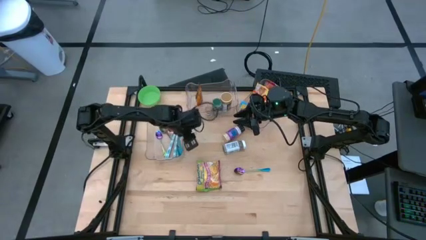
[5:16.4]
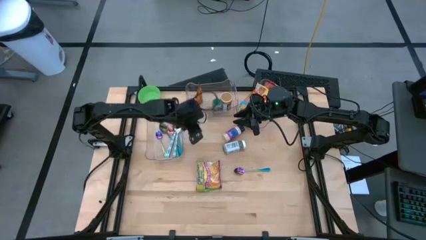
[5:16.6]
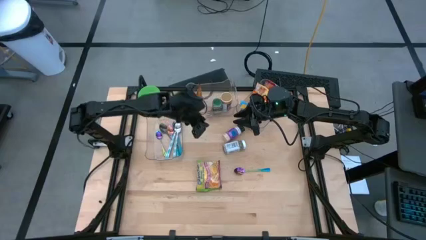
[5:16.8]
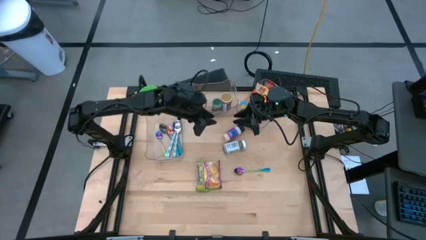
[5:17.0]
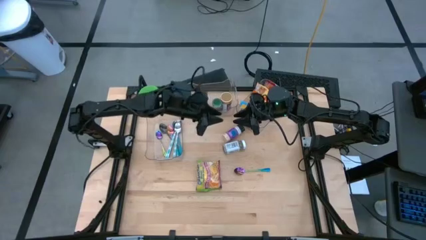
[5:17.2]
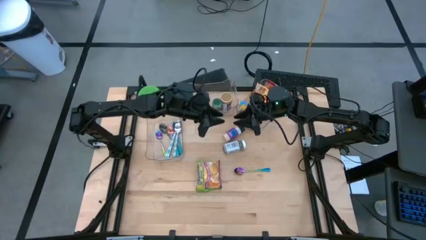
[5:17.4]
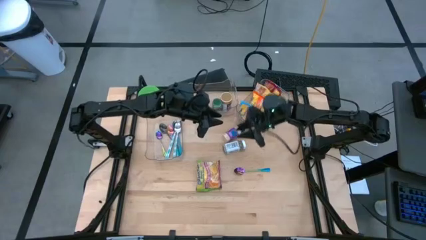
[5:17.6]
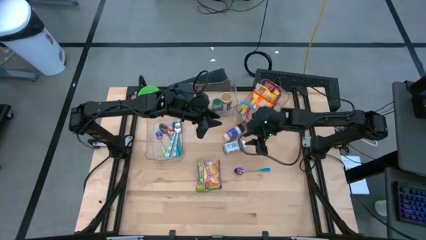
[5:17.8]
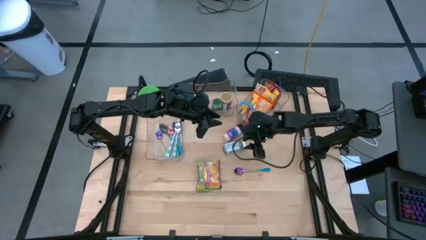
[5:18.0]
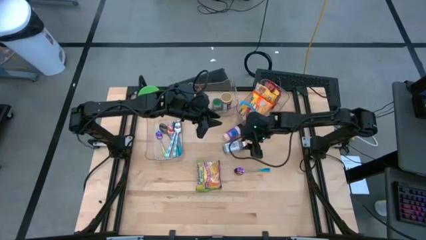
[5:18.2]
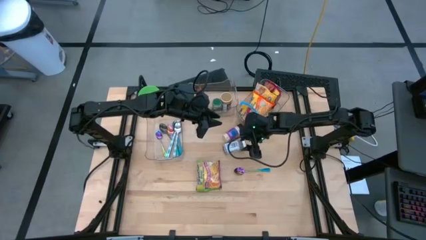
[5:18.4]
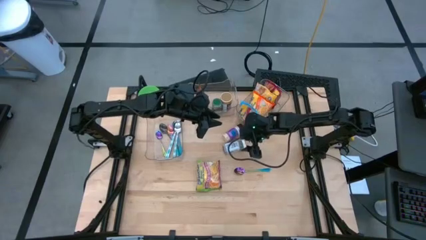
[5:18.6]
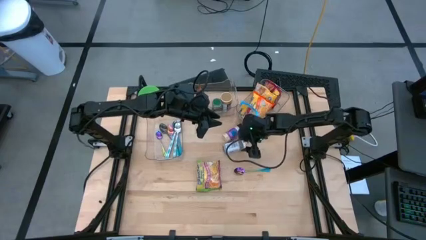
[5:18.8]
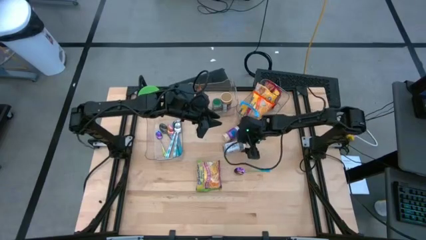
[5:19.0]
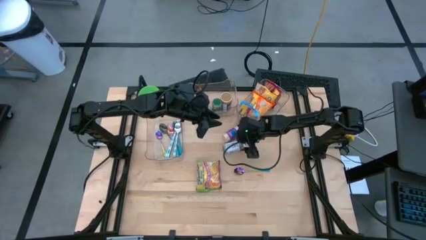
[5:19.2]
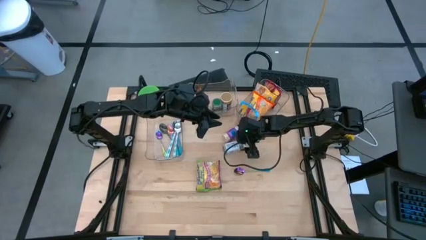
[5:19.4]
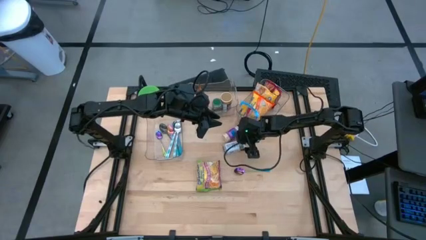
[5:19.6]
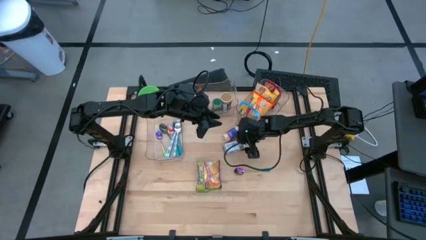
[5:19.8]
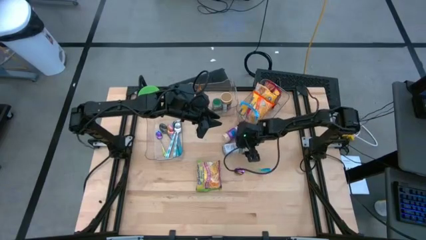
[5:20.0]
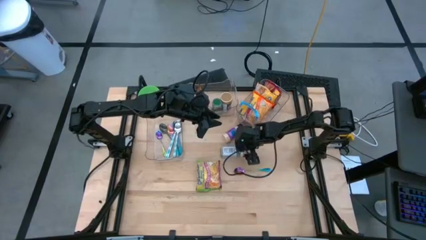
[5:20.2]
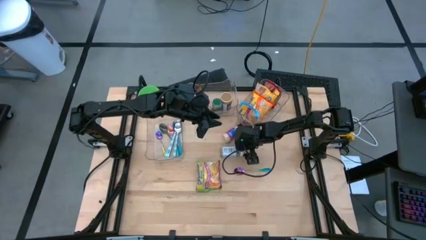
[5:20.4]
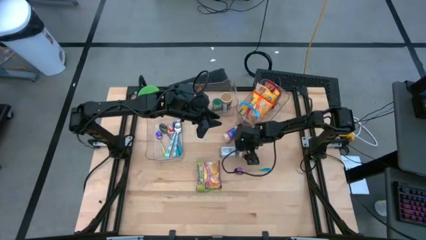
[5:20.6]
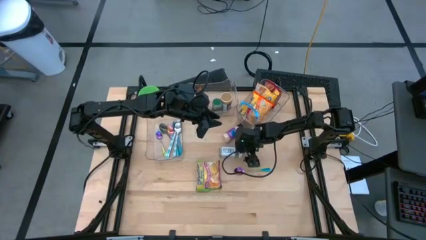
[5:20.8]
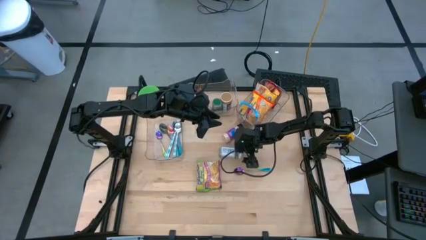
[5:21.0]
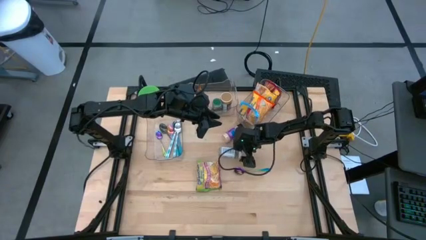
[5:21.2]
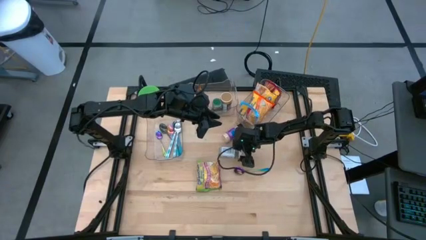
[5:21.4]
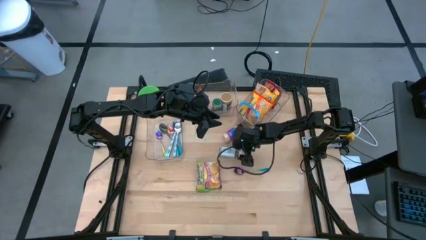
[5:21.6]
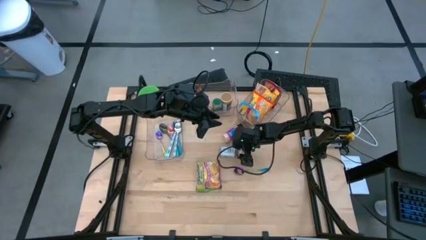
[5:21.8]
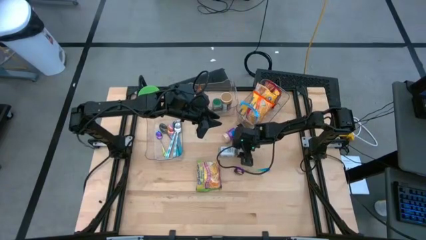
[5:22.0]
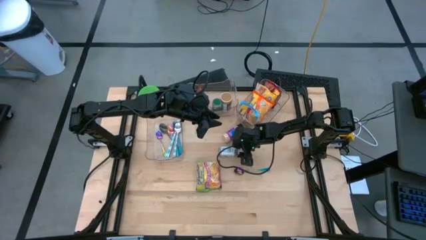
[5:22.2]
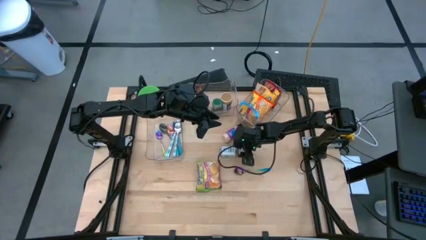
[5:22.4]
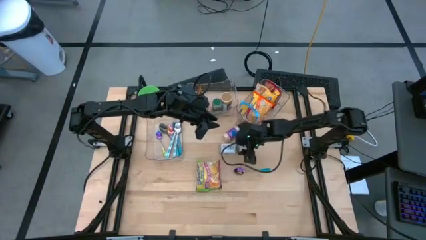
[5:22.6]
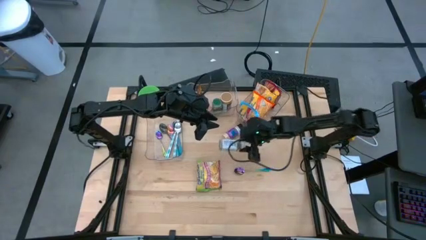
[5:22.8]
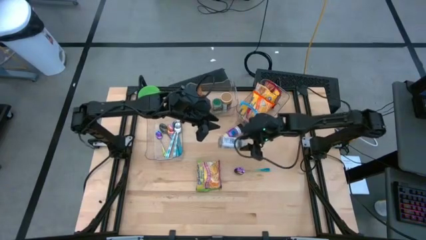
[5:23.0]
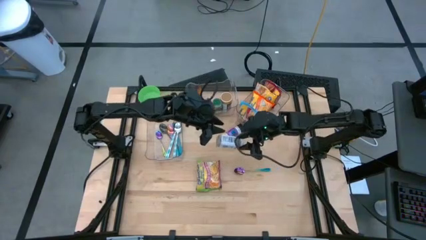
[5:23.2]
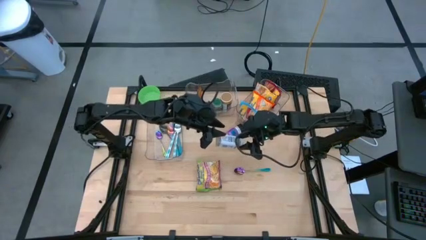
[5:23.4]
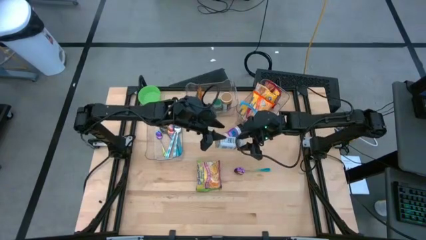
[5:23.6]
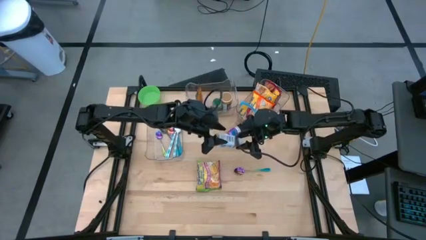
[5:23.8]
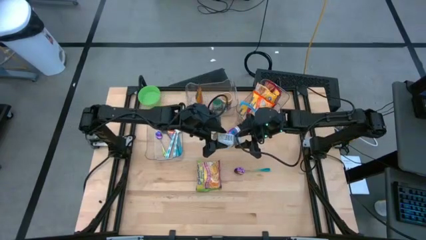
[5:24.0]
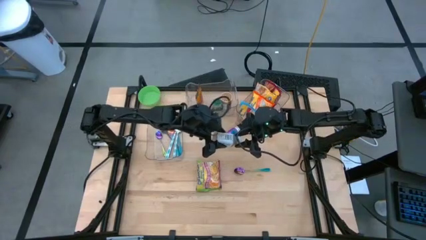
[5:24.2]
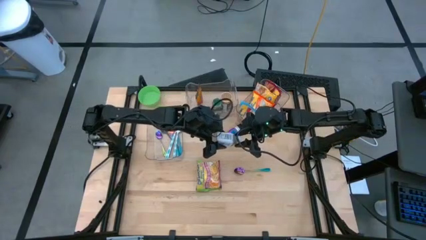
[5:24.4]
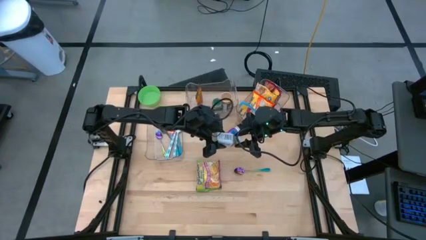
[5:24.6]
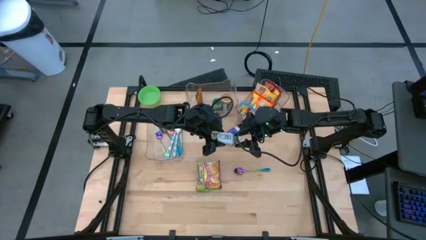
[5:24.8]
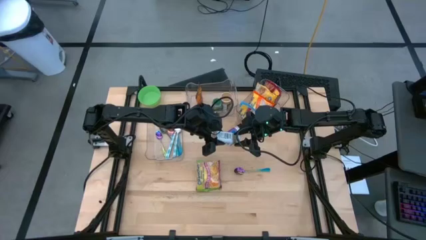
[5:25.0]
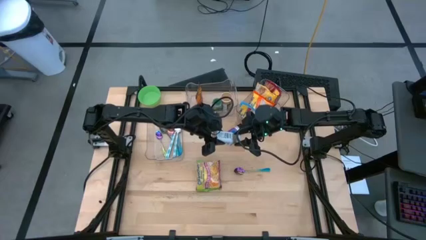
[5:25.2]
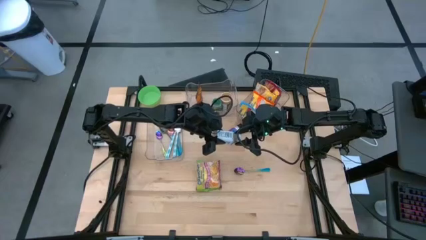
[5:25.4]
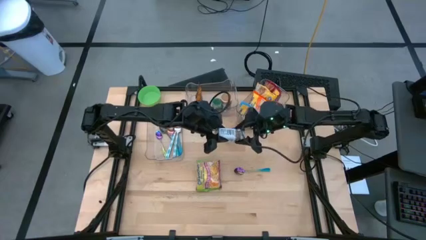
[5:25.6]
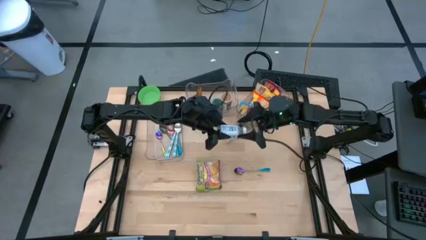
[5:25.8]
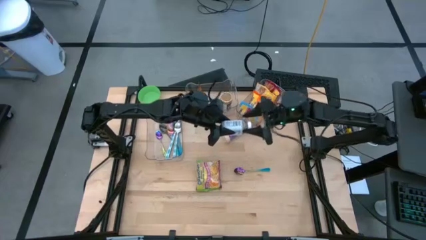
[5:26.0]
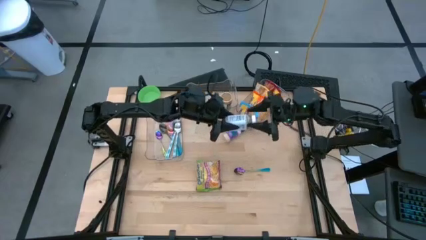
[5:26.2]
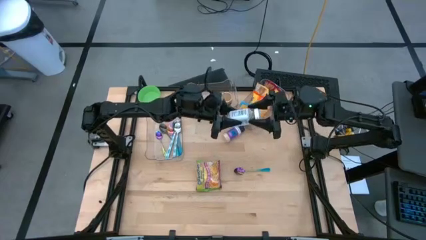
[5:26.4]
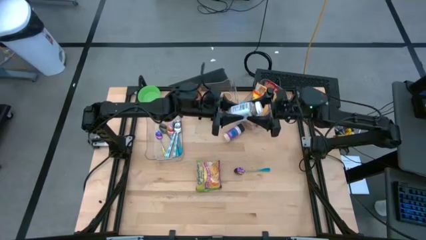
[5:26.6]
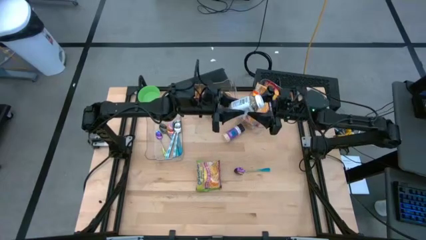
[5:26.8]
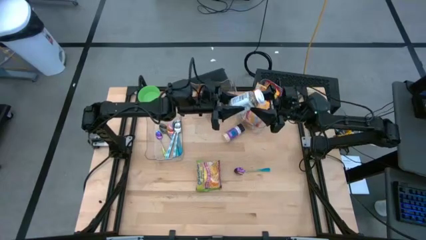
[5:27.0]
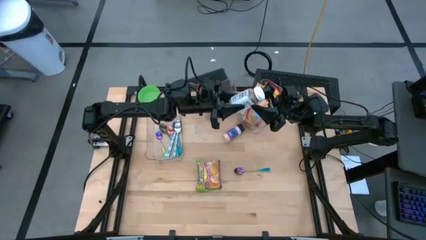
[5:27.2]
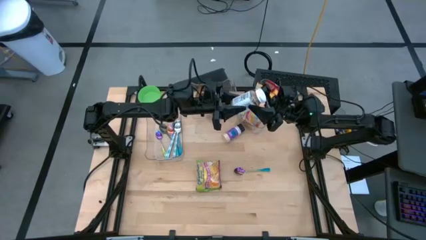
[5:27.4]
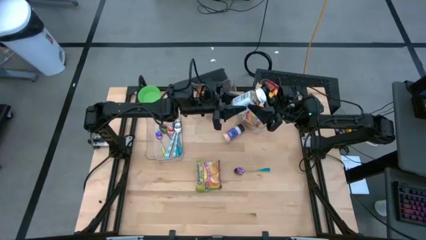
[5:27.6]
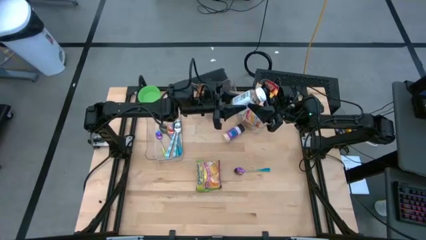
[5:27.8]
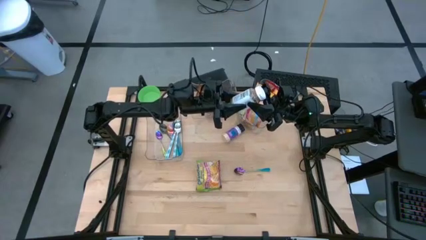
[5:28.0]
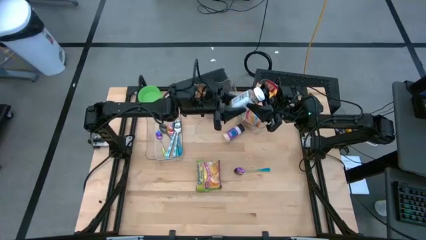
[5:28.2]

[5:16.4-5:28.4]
Task: Pick & Place Food Item
Put the white spice bottle into the middle transparent bin

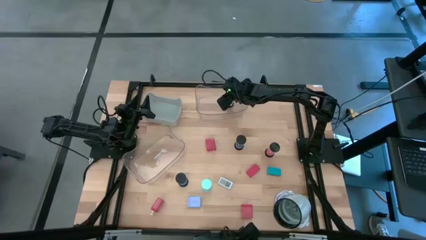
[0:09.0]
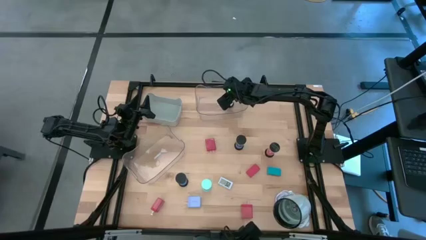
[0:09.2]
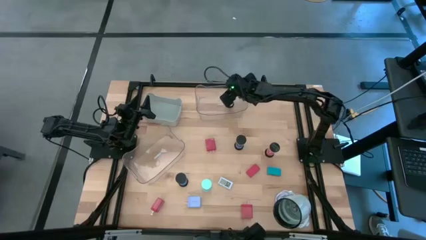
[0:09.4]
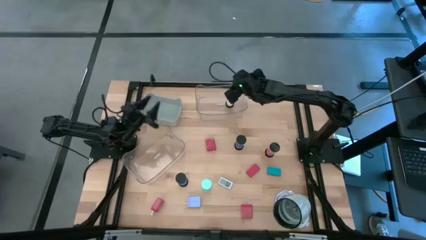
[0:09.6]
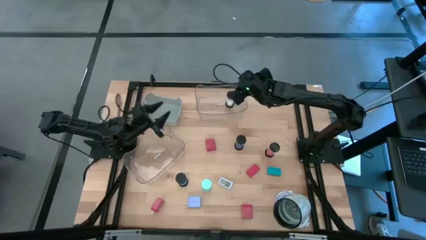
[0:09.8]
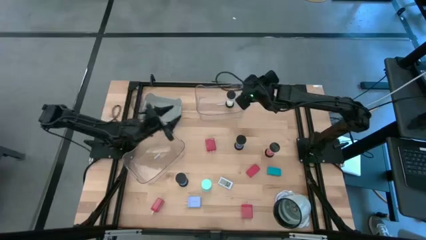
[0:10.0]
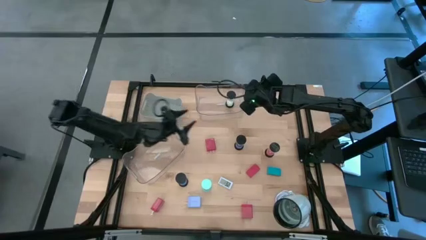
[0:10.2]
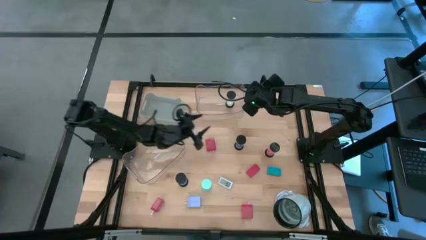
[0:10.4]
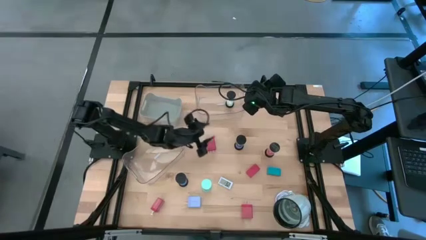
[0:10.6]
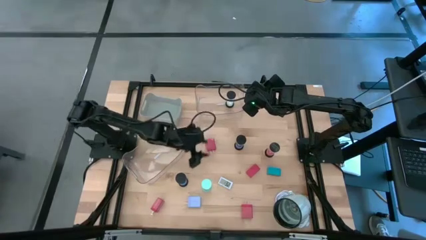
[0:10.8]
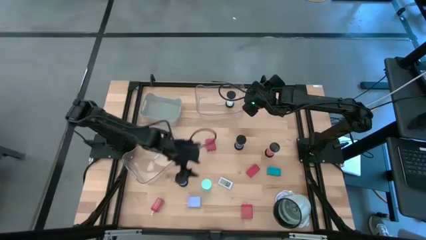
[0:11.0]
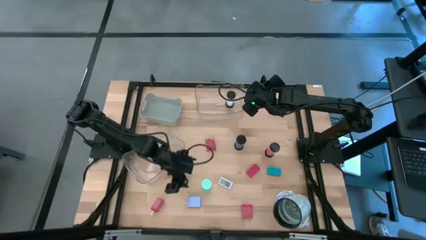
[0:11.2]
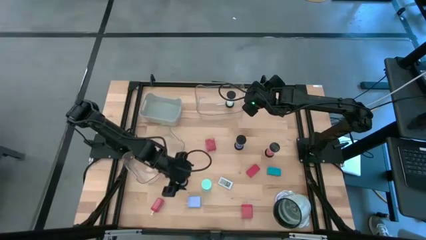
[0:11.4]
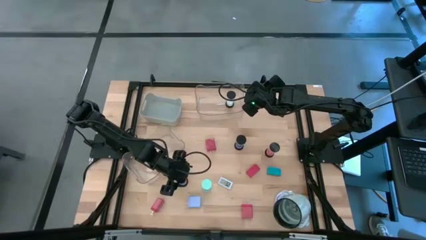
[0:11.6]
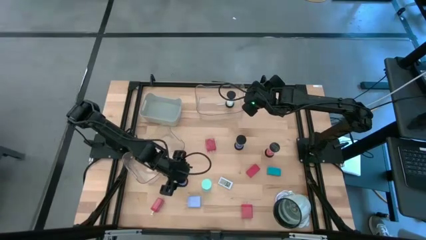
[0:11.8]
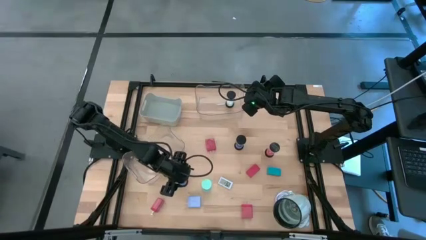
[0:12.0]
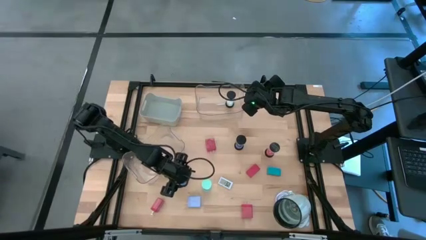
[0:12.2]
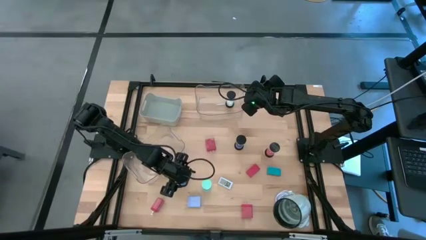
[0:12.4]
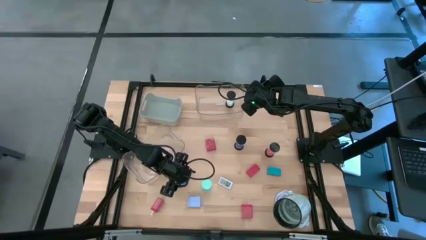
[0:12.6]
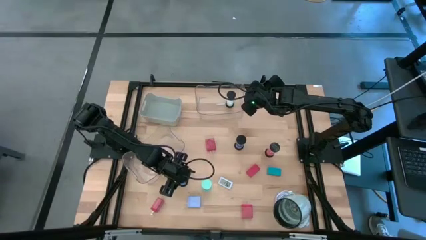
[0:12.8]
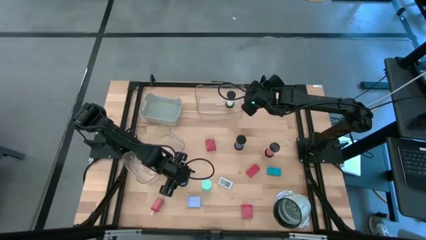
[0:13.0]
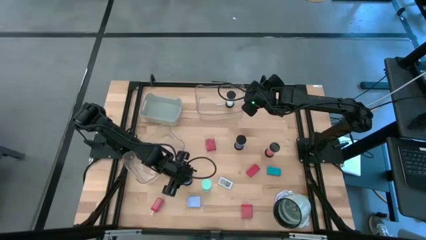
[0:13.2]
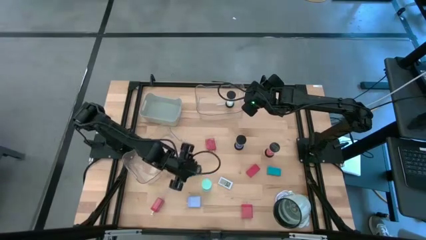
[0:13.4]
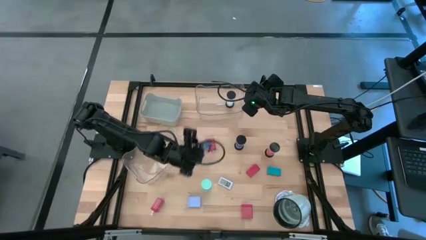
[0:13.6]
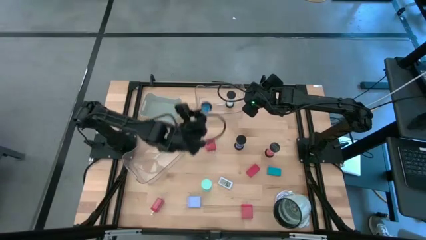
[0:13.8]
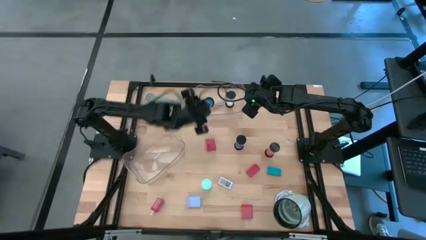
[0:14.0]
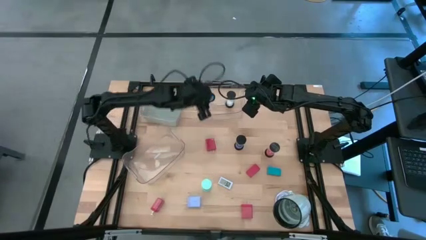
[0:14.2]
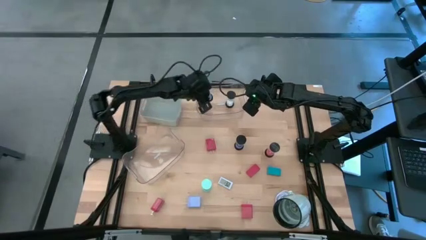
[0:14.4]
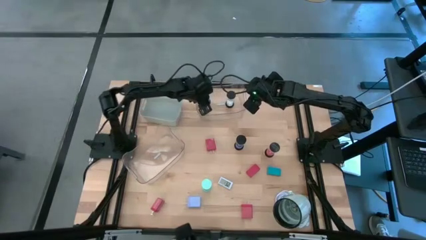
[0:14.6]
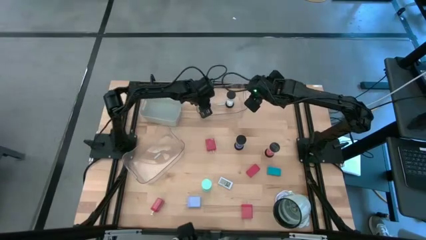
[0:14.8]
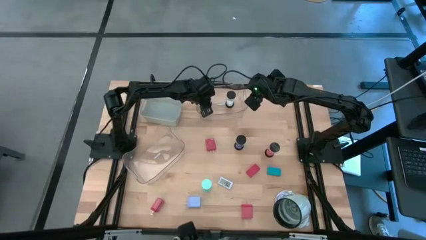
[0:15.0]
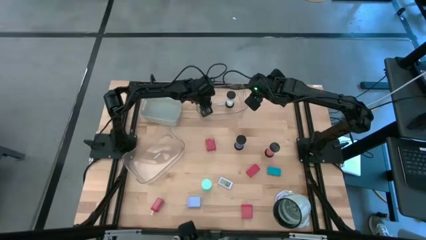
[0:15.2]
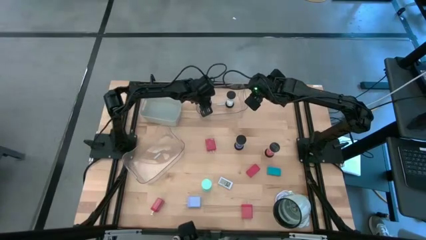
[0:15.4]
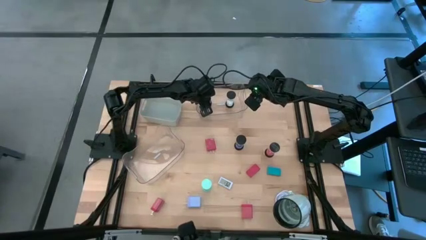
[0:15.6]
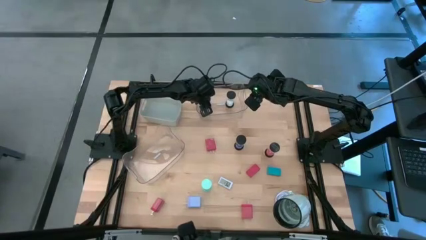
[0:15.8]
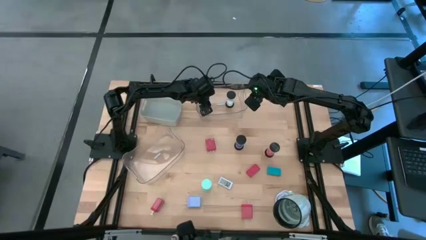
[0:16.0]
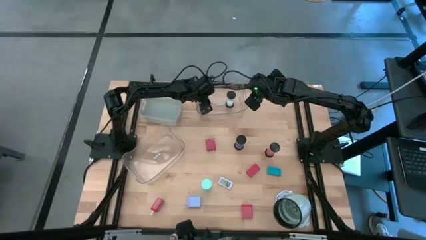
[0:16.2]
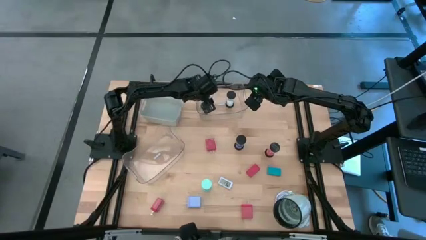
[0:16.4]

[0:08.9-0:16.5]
Task: Pick & Place Office items
Put the left purple hourglass into the top transparent bin
